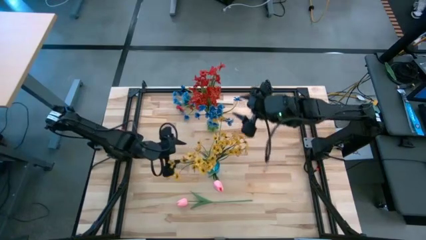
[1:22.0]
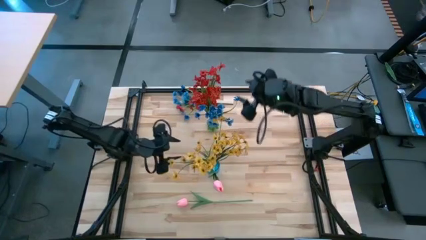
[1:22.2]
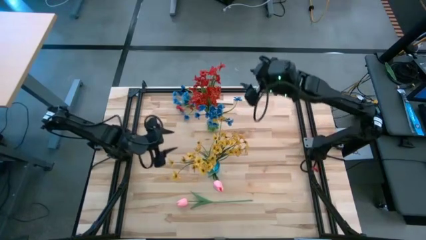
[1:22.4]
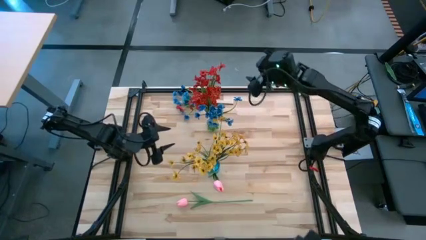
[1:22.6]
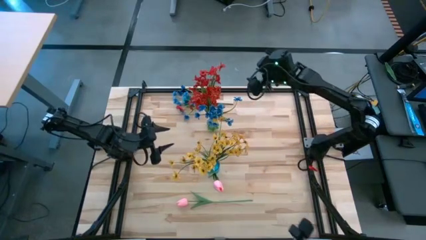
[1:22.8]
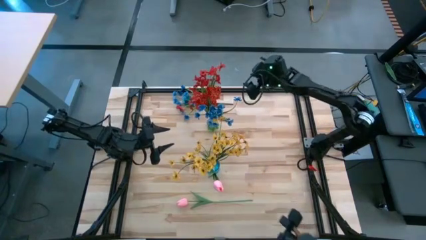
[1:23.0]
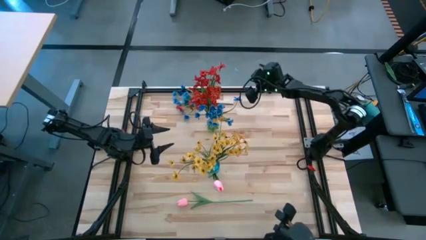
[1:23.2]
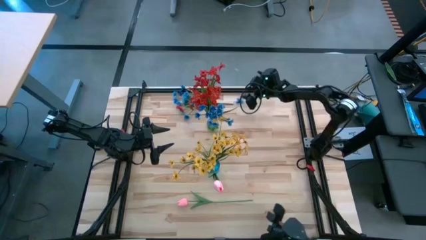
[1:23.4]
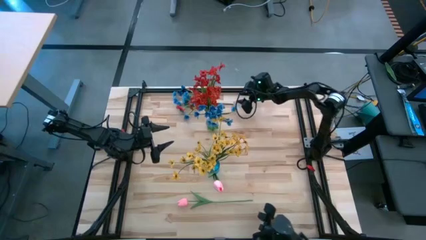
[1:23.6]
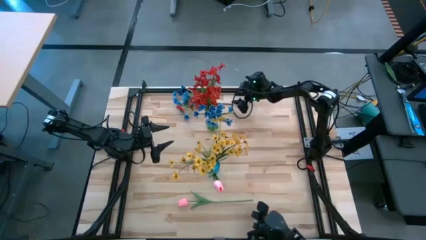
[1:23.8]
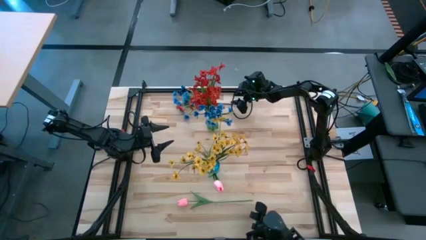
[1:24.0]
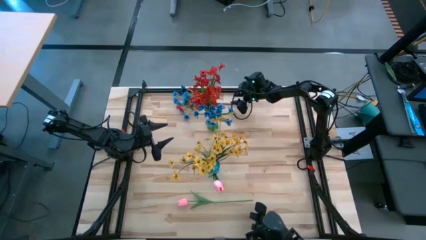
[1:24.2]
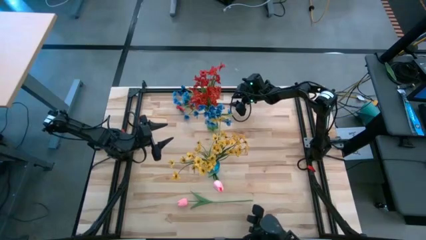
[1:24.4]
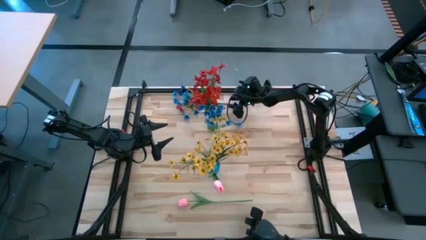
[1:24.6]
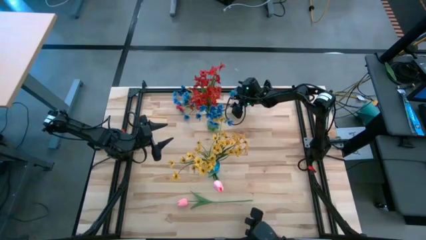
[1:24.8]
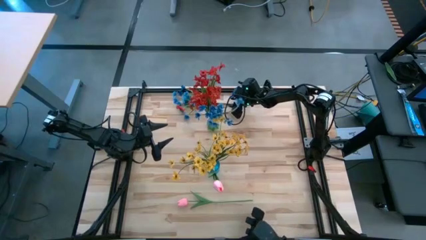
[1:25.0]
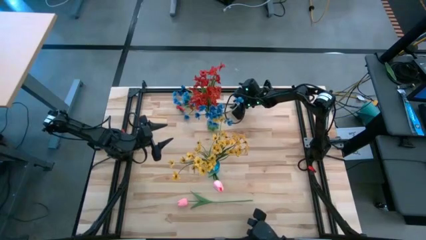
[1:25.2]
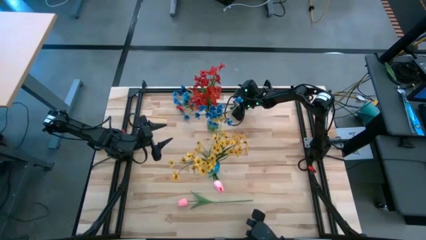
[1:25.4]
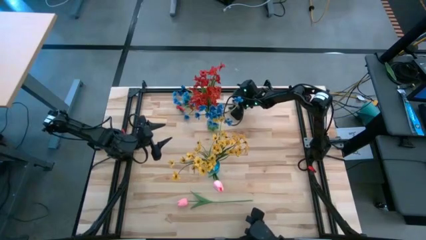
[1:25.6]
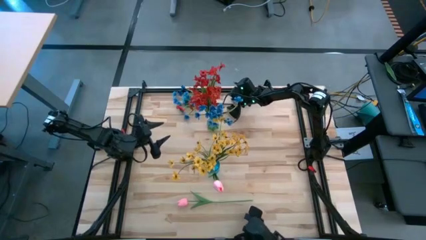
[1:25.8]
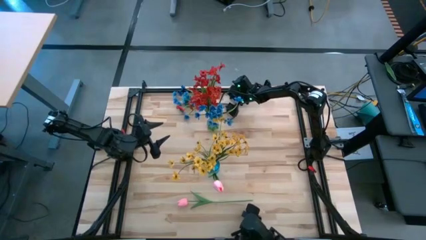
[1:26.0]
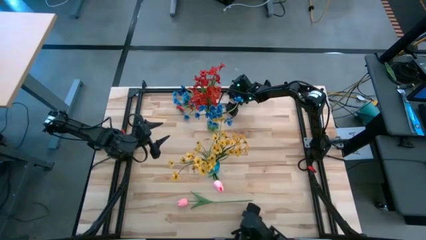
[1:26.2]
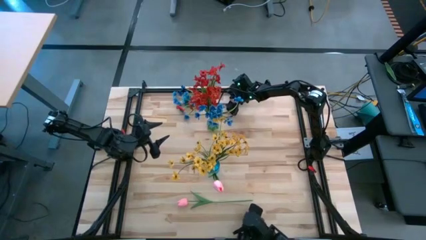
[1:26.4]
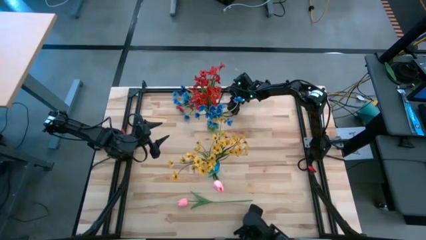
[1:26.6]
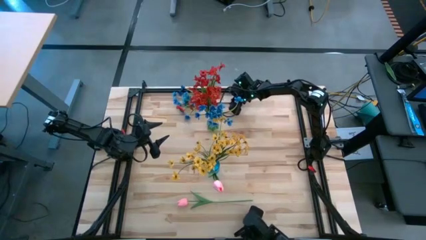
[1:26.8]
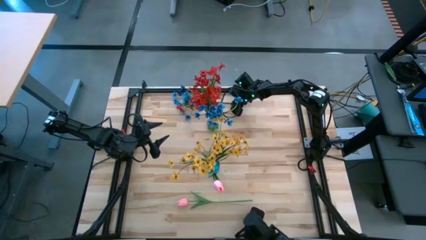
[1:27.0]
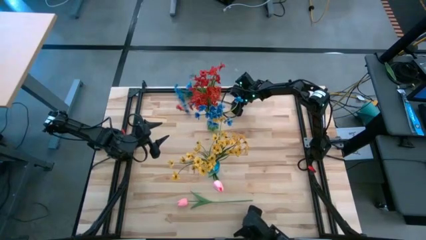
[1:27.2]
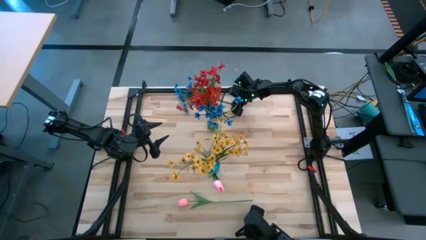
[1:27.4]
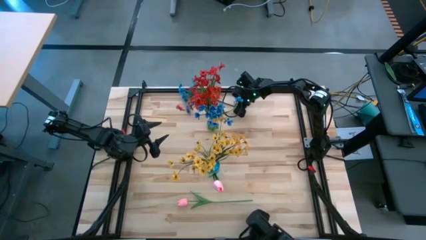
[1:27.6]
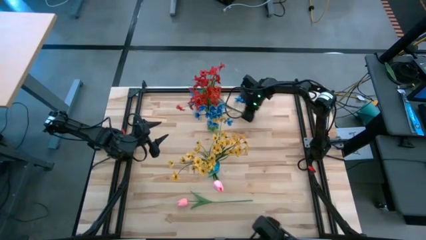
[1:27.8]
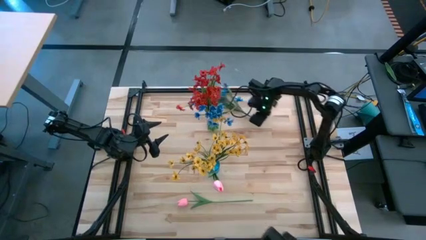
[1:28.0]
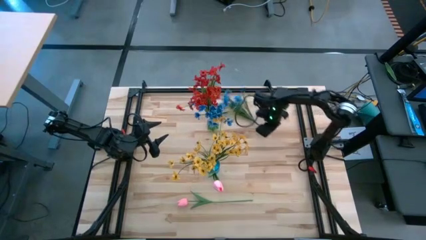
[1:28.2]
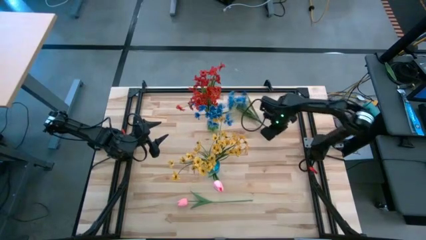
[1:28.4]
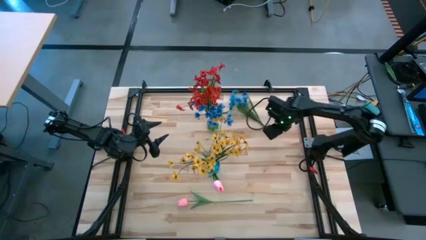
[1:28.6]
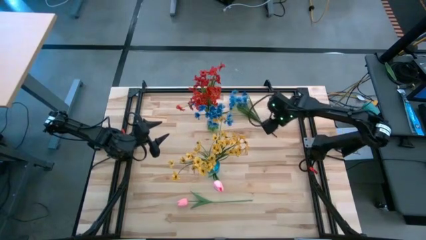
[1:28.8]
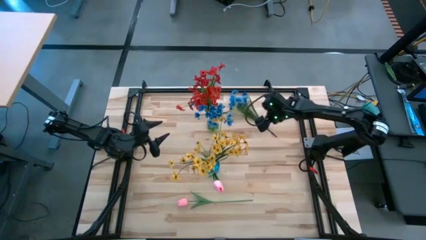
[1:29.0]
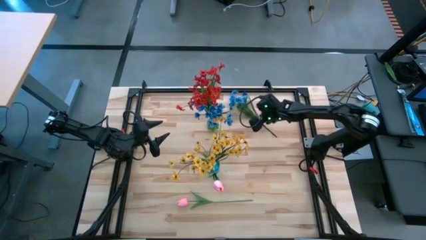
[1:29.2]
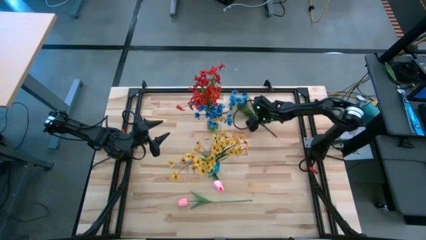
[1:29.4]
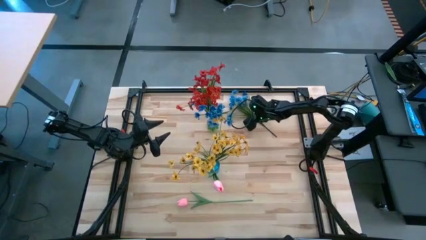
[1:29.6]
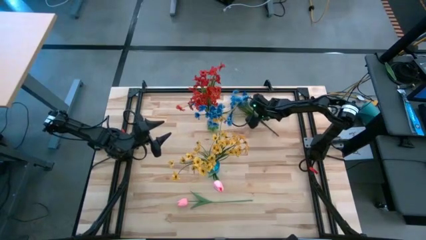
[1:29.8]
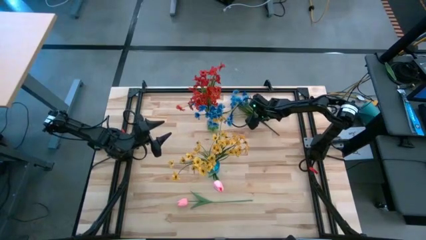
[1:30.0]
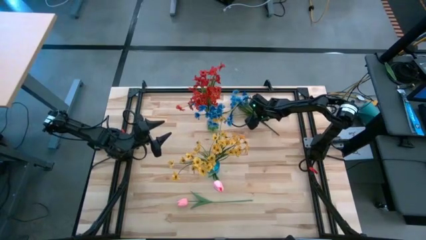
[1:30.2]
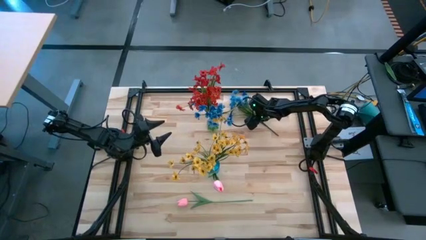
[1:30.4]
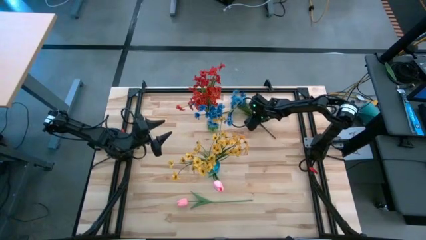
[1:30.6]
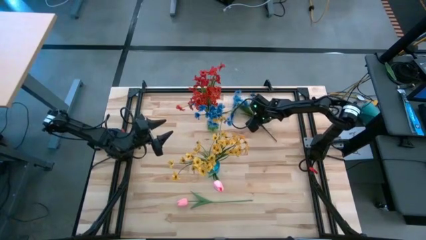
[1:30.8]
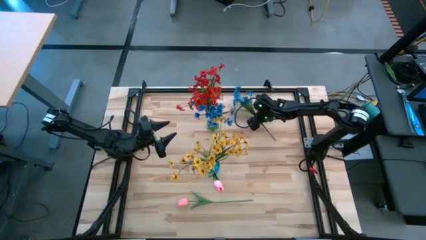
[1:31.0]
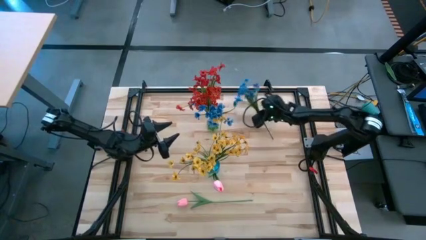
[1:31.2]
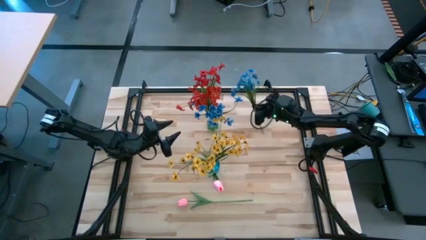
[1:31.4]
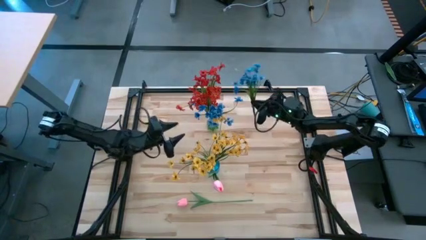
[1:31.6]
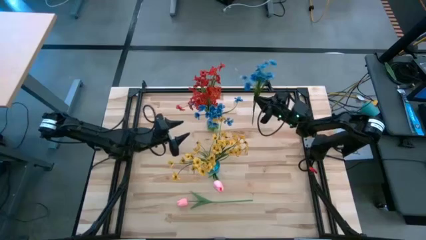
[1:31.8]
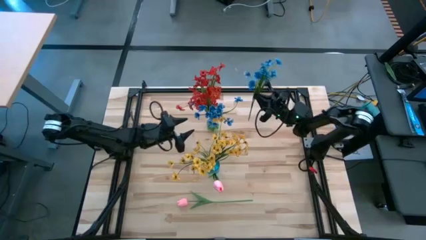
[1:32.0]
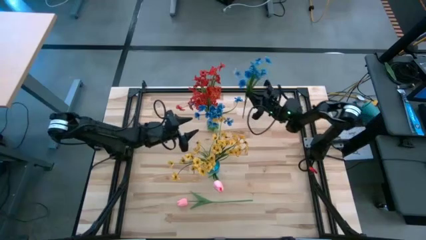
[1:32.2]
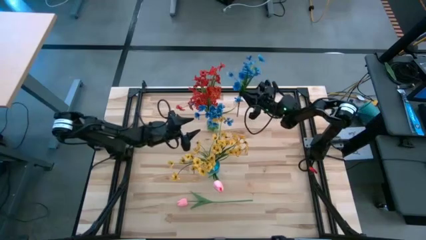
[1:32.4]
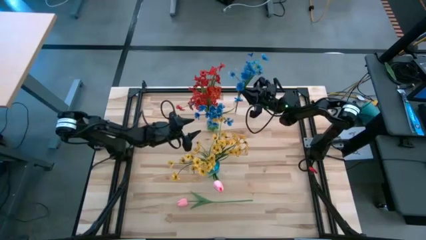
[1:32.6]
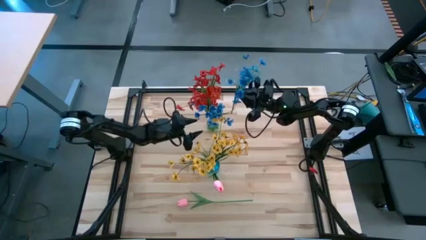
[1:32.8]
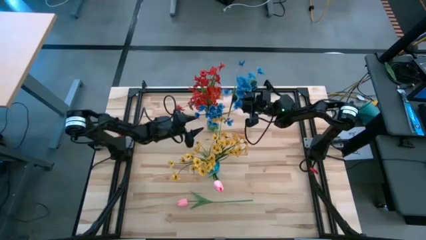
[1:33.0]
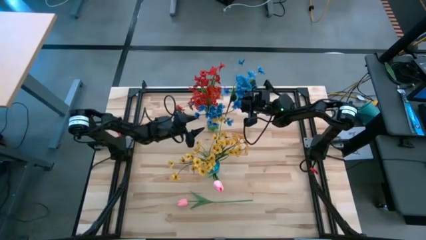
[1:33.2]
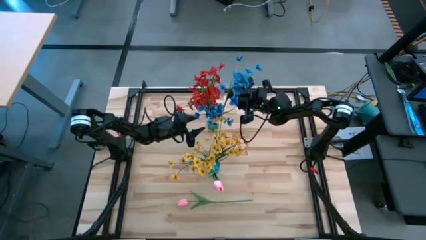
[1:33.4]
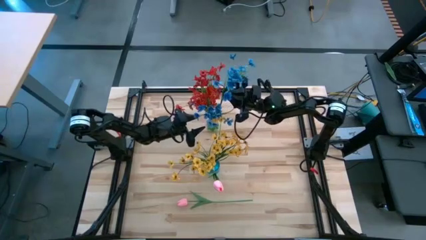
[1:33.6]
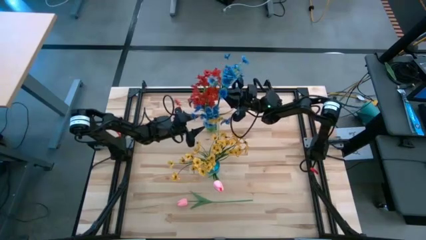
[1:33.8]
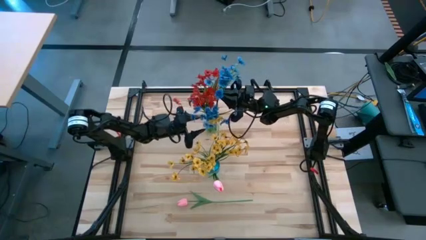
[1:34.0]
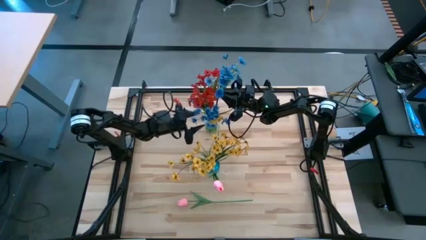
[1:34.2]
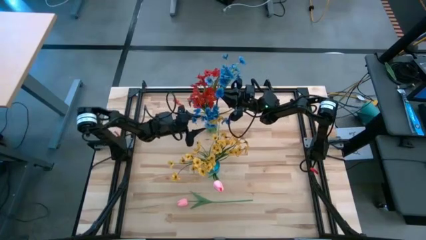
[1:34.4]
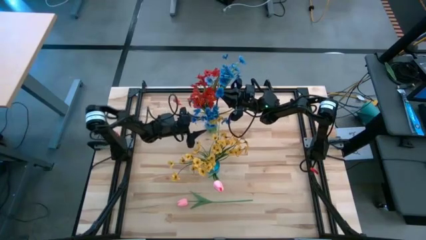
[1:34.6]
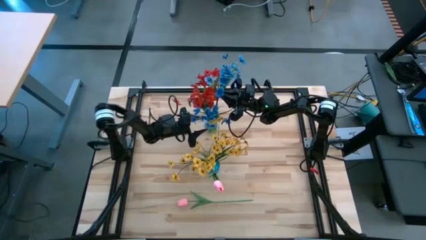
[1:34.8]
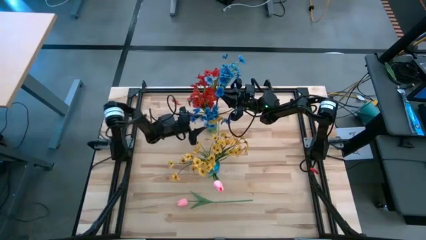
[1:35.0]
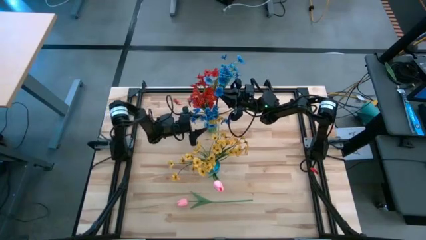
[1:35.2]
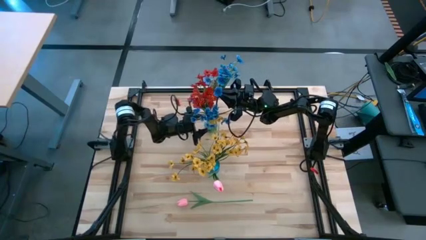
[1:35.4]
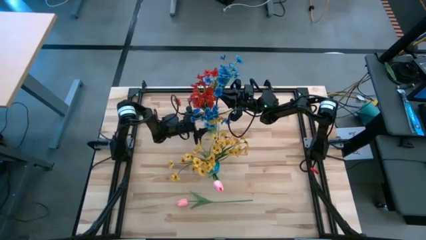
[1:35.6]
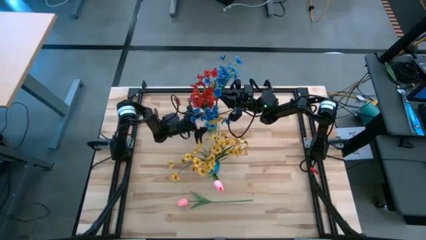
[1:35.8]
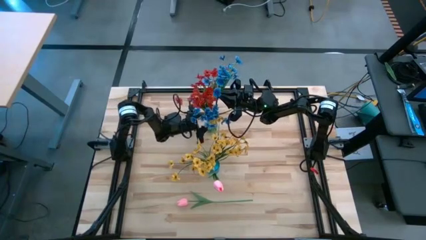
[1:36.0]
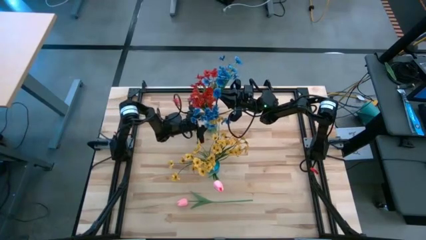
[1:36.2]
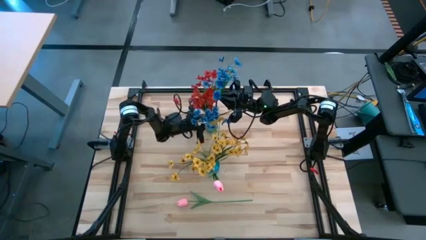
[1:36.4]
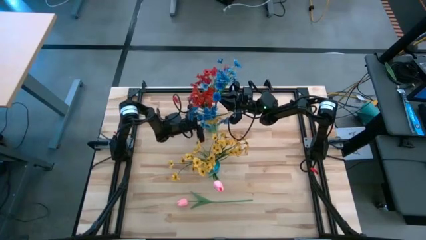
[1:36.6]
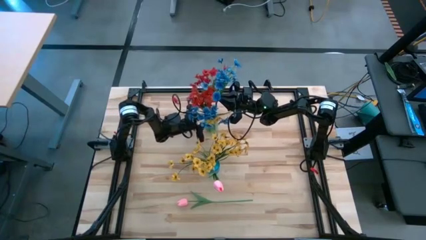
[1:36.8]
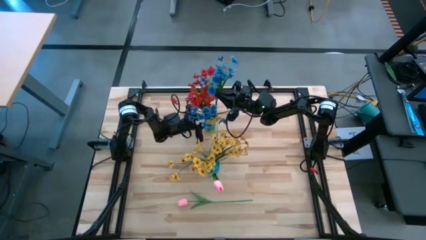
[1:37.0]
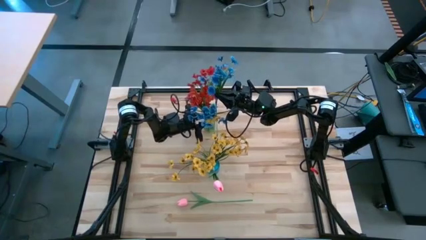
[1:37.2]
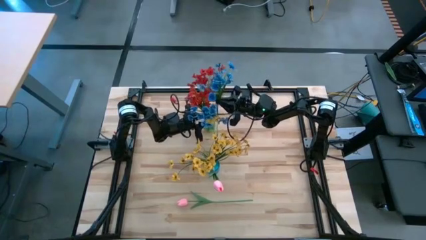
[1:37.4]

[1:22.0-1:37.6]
Task: Sort flowers into vase by color
Put the blue flowers into the green vase
